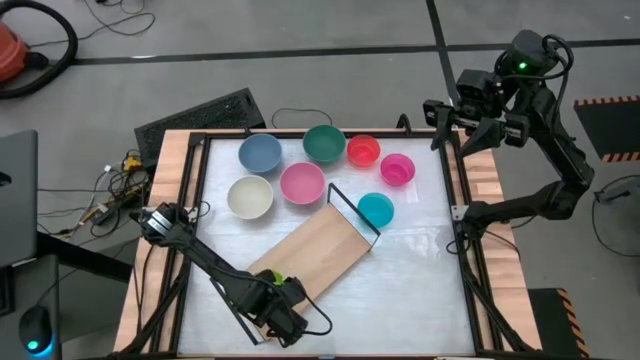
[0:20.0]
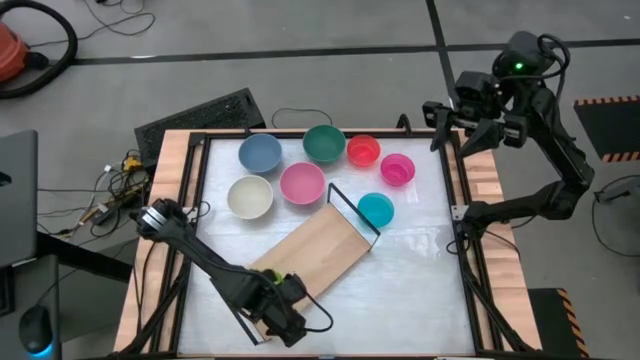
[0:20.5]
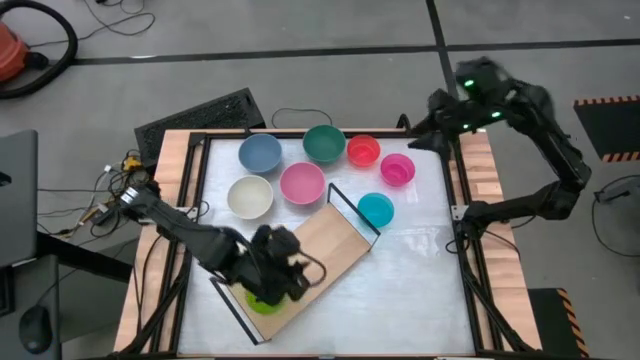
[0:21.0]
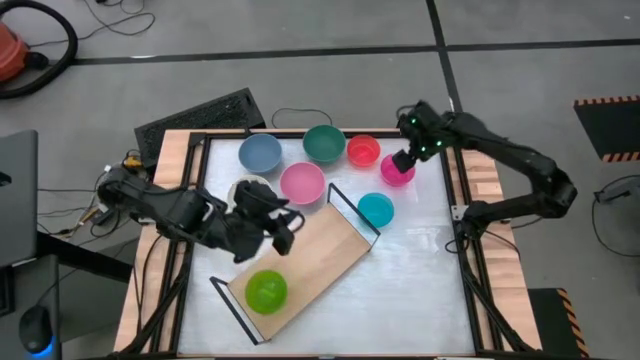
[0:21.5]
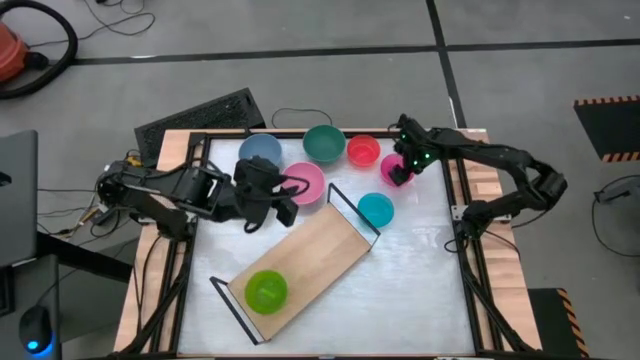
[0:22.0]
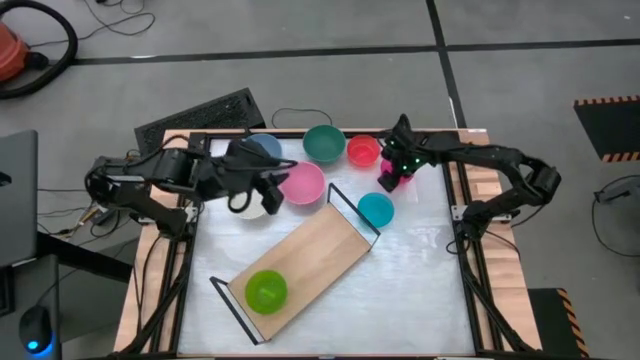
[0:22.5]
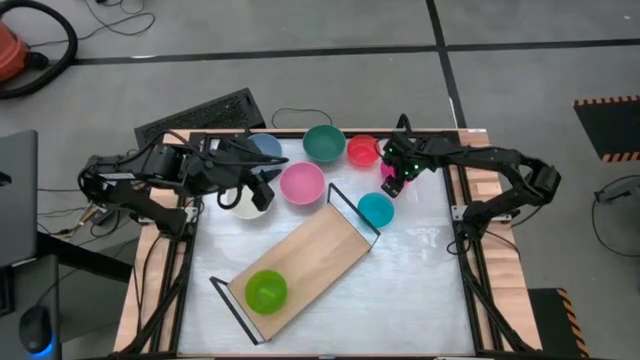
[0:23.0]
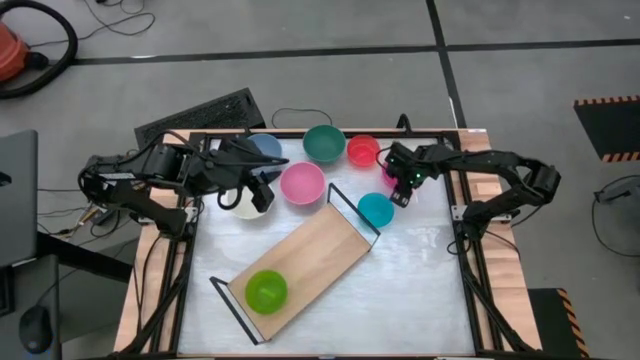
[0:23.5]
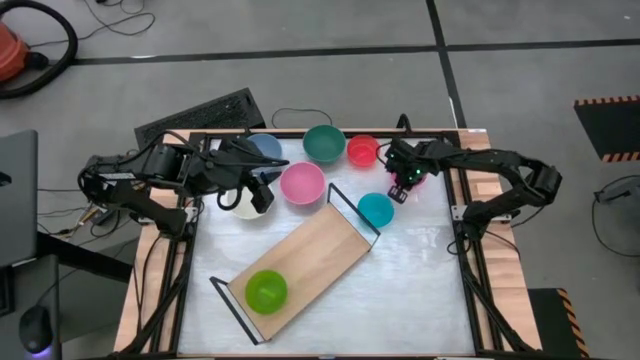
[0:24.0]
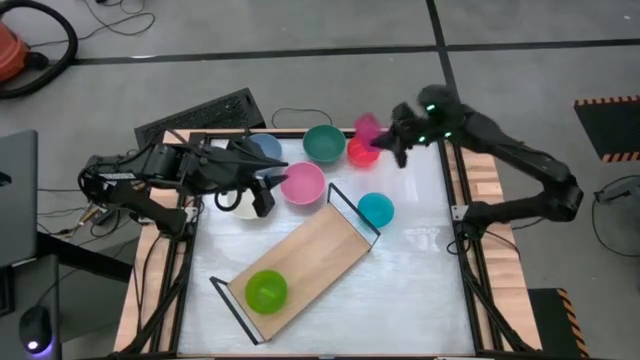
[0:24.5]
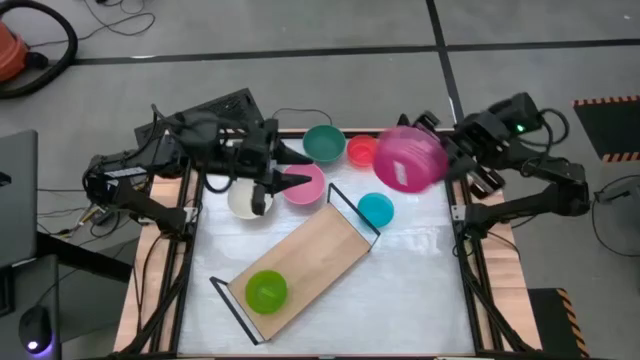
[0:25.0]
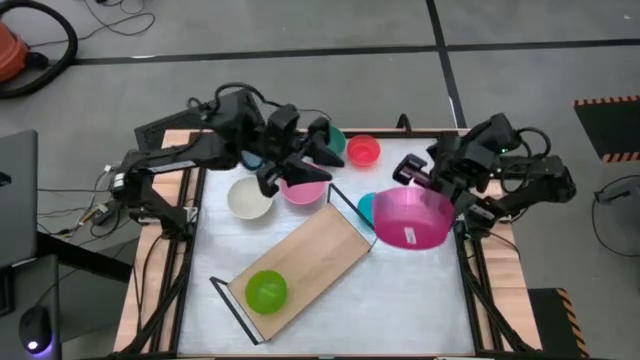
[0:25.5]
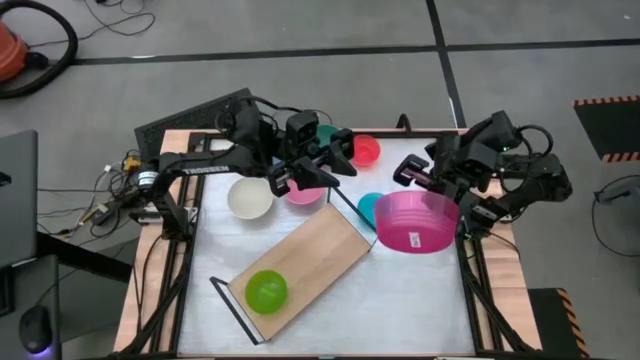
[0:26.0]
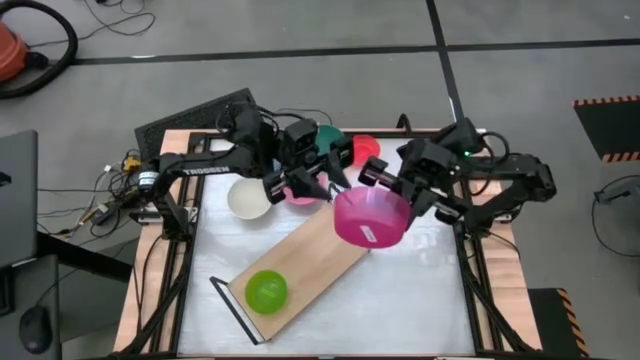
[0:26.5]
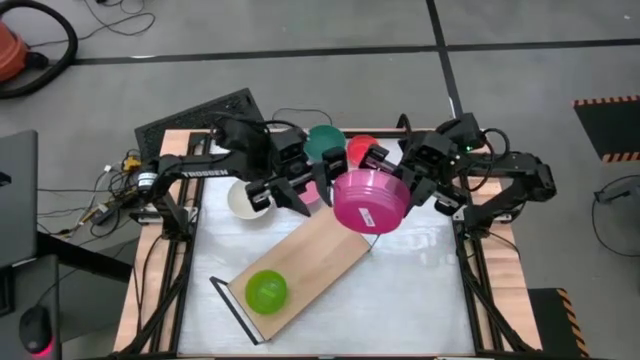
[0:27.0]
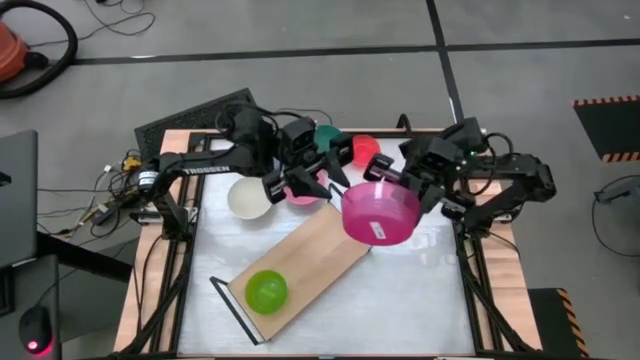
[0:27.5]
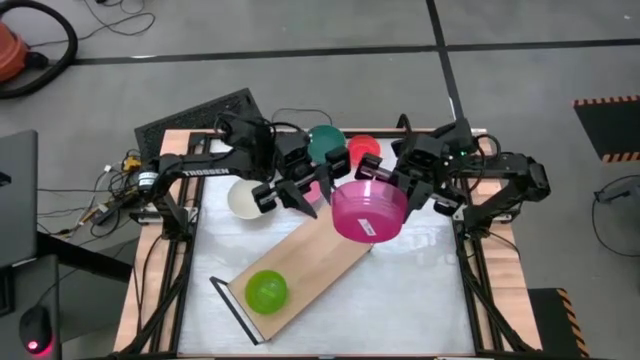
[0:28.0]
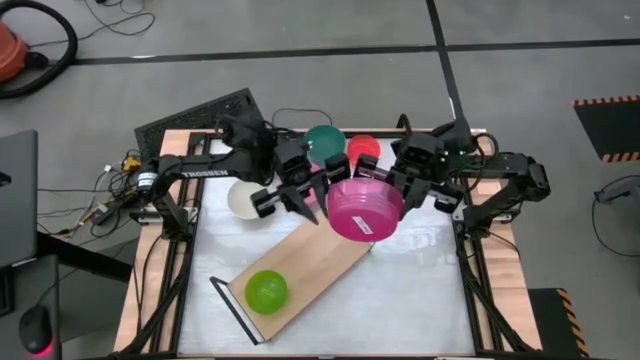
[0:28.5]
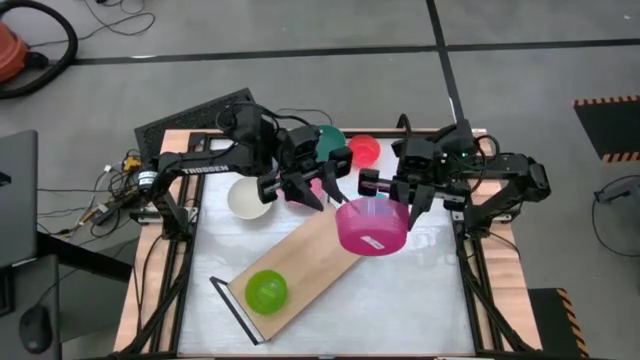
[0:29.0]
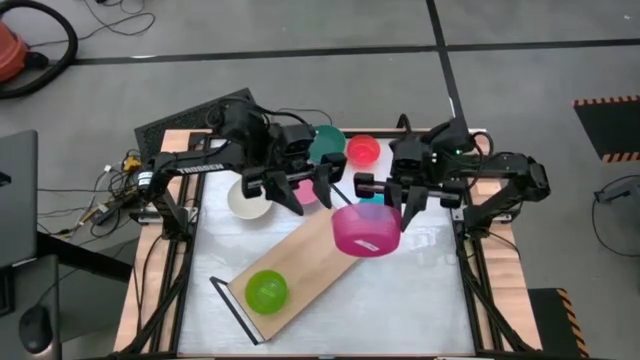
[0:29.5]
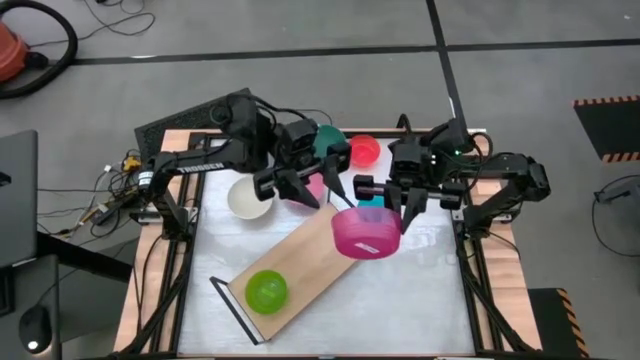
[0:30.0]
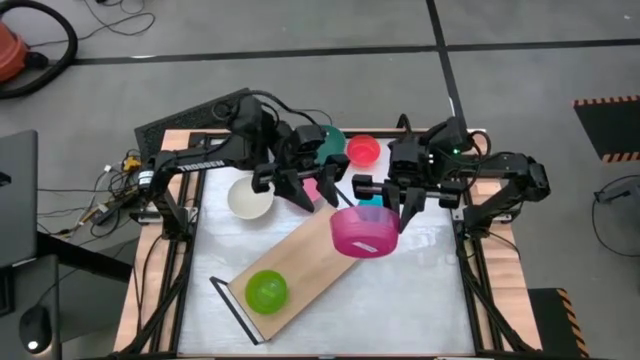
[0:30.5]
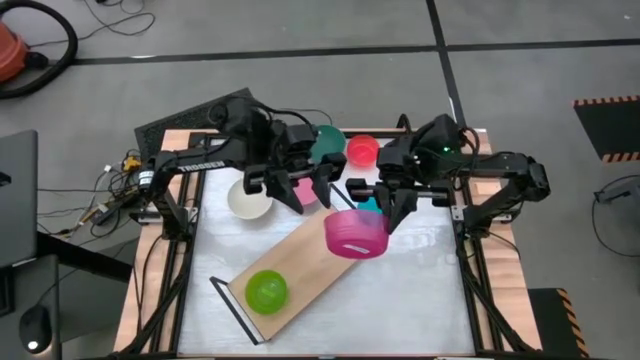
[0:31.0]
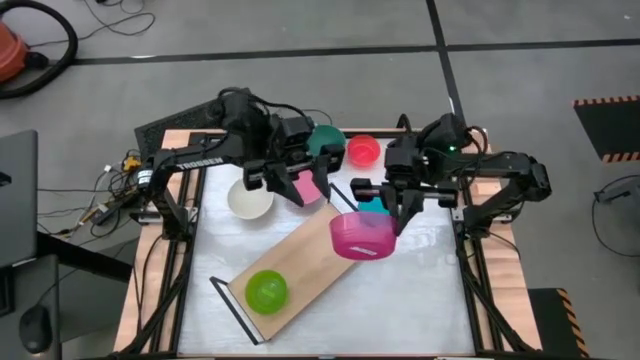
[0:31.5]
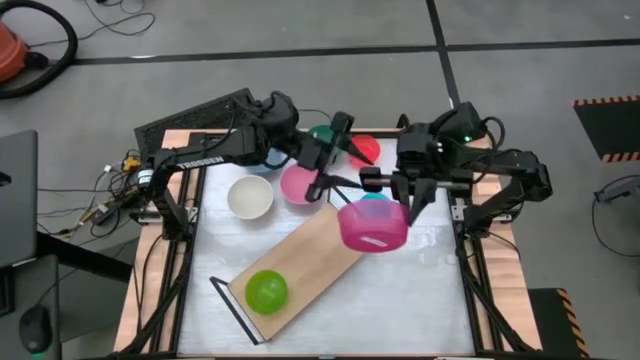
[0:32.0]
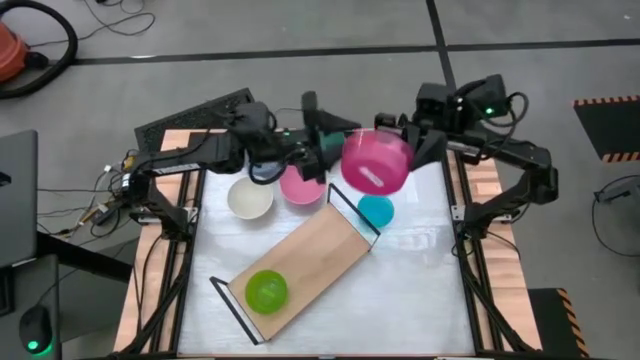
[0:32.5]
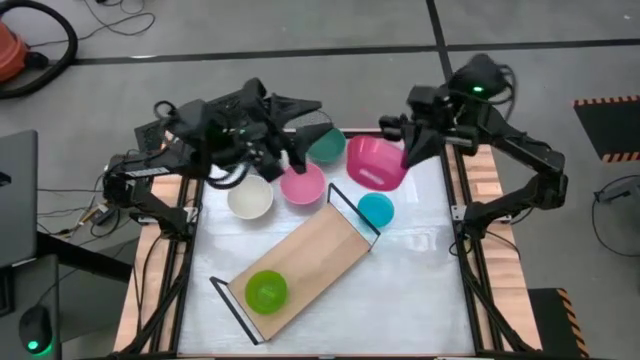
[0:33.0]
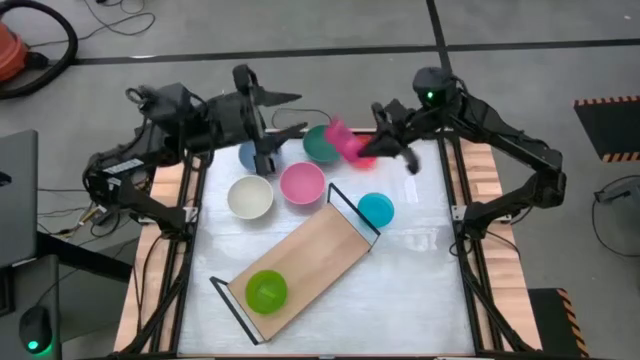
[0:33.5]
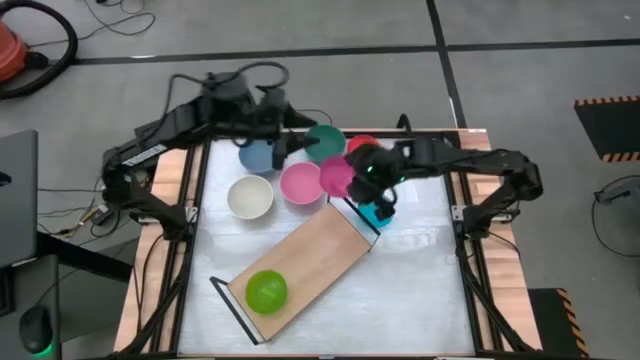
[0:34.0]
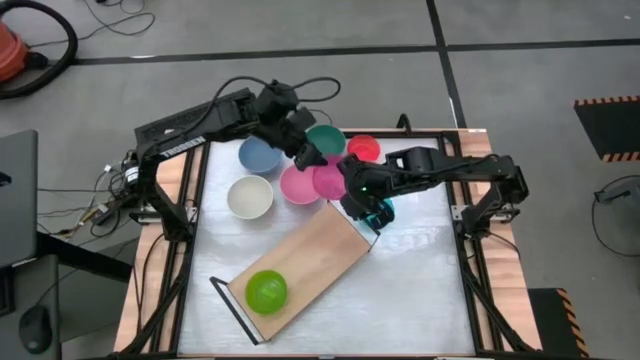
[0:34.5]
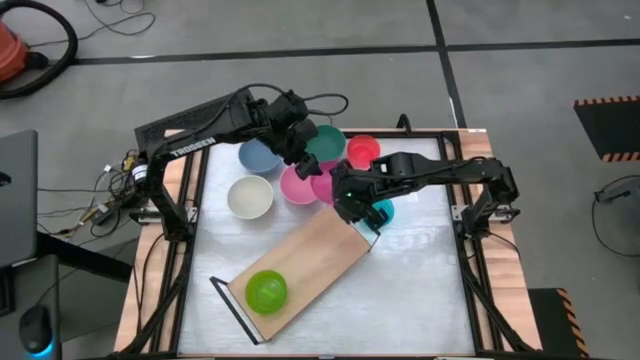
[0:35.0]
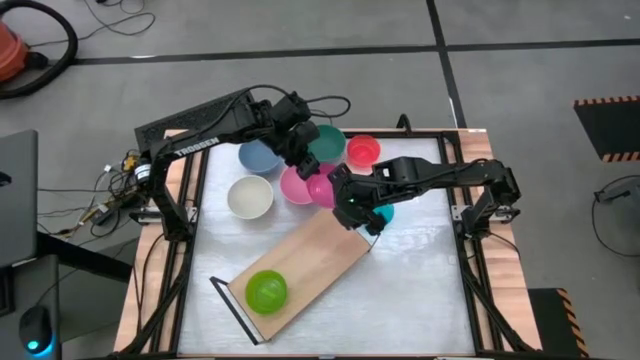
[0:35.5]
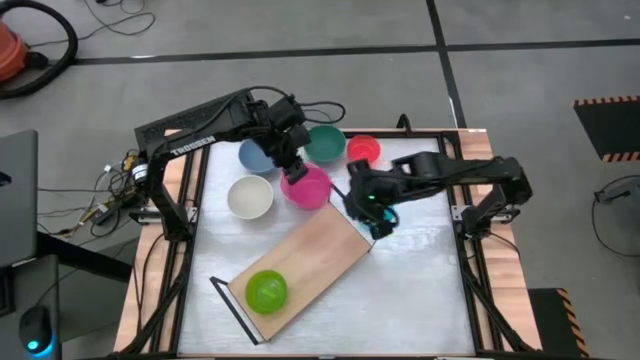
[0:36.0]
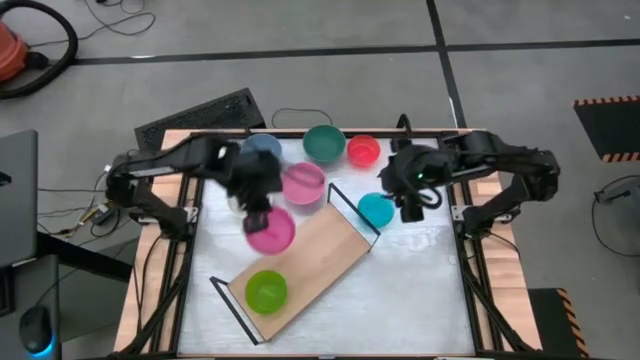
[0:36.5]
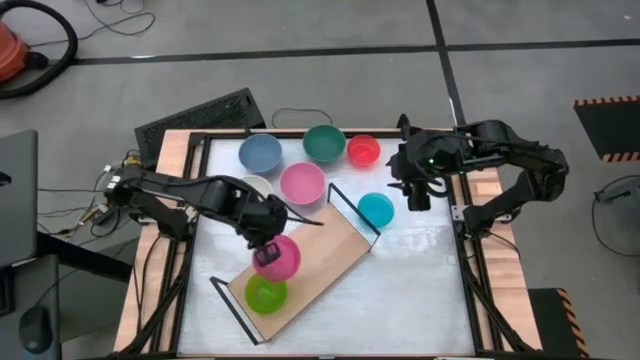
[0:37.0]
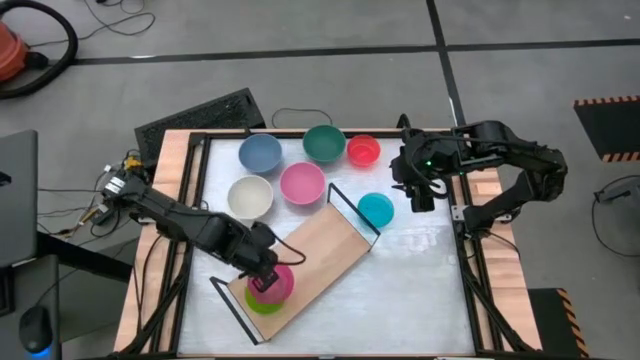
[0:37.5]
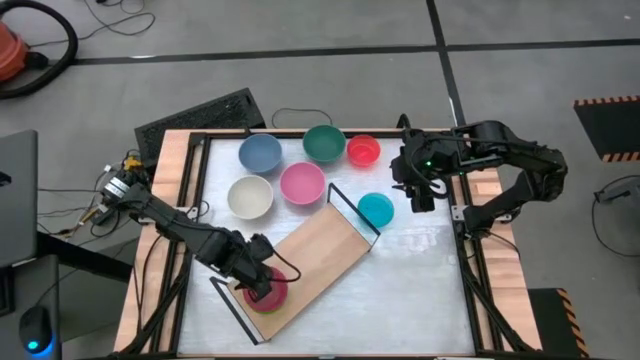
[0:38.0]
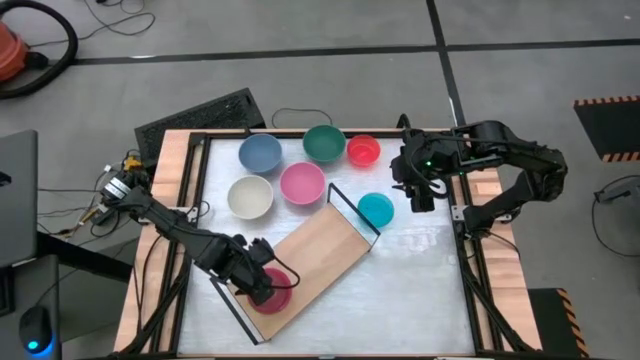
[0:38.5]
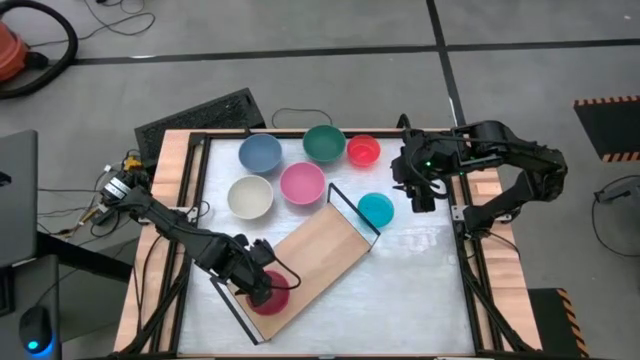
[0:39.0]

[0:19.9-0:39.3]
Task: Place and stack bowls onto a shelf
Stack the transparent pink bowl on the top transparent green bowl on the shelf

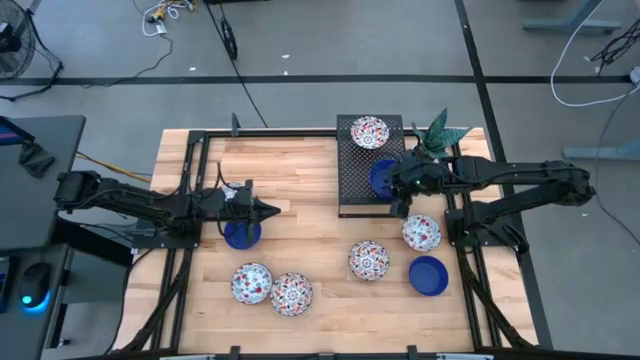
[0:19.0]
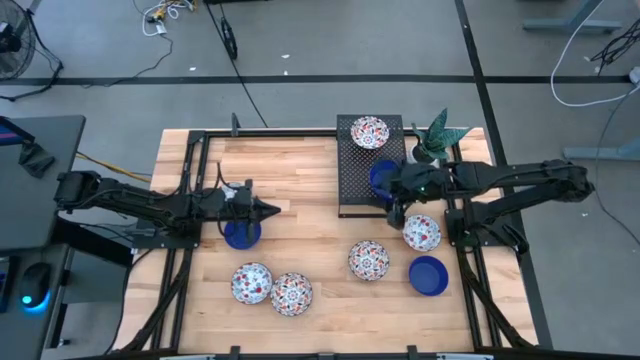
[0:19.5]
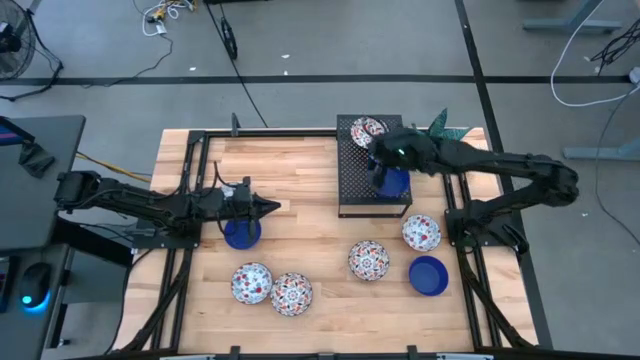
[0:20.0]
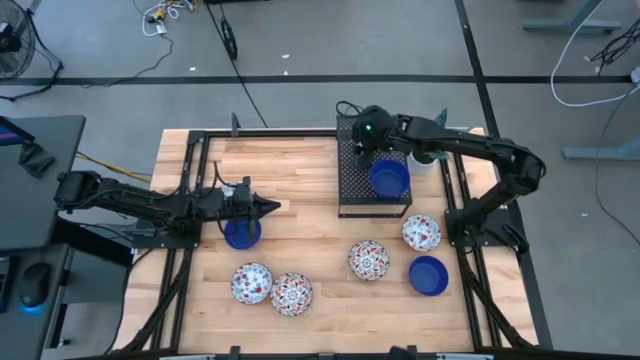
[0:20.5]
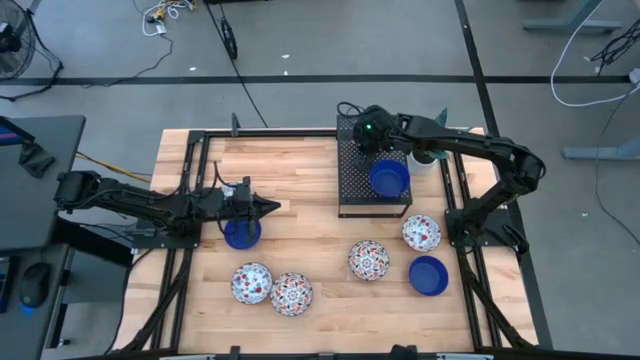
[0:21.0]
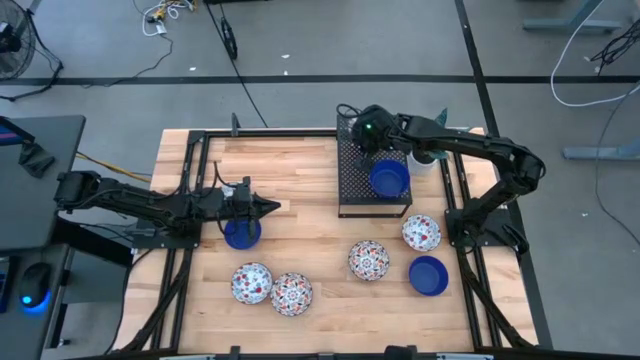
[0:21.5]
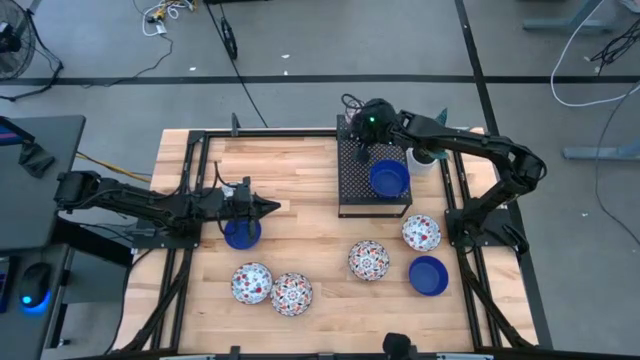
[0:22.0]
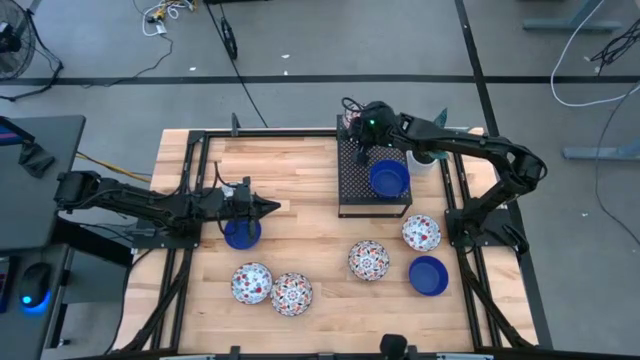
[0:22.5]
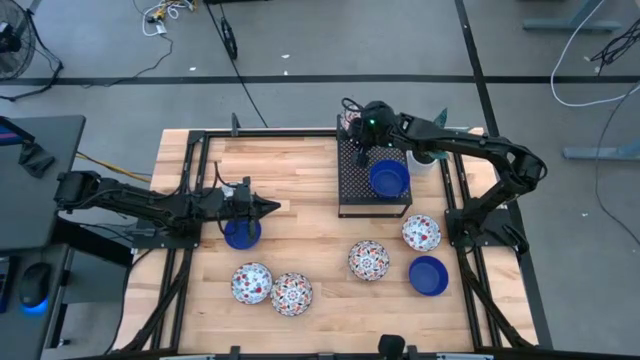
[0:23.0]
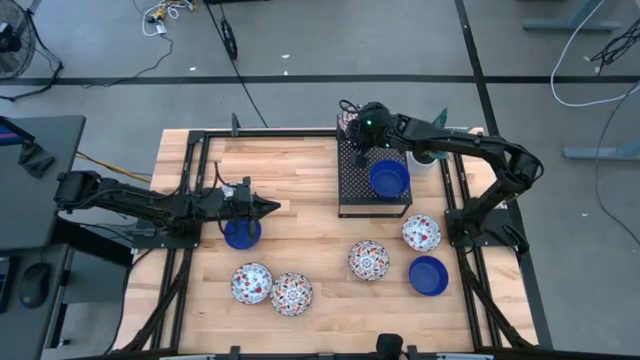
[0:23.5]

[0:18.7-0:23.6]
Task: Pick & Place Mini bowls
Adjust the orange patterned bowl on the shelf
